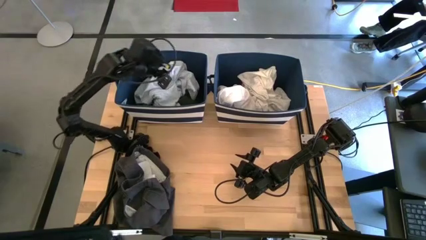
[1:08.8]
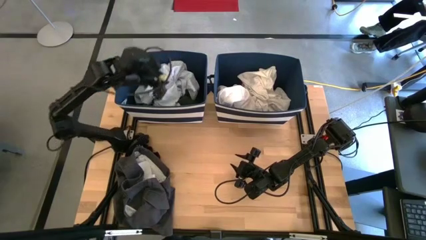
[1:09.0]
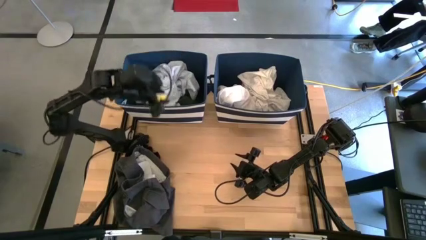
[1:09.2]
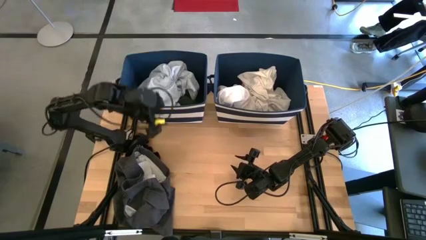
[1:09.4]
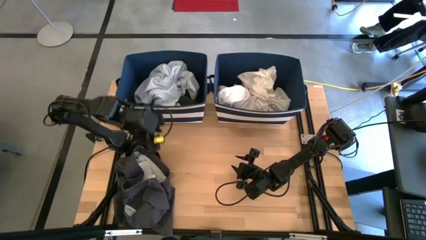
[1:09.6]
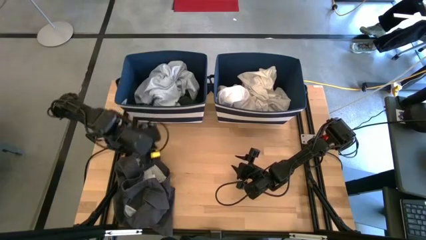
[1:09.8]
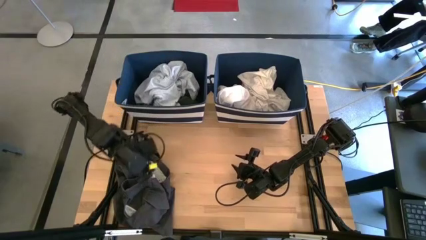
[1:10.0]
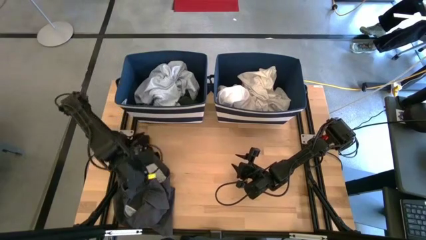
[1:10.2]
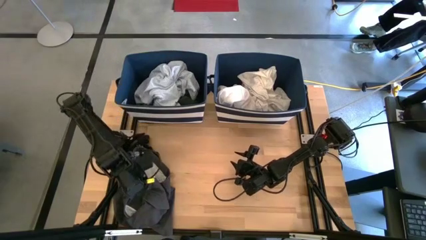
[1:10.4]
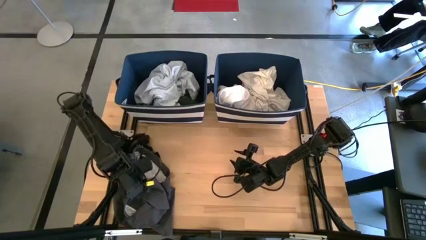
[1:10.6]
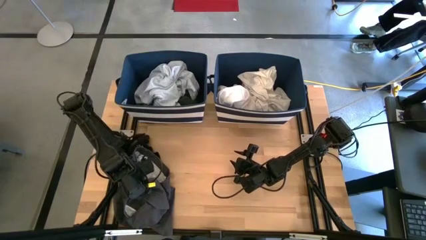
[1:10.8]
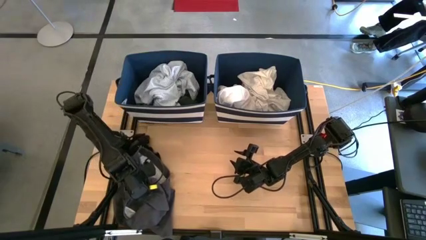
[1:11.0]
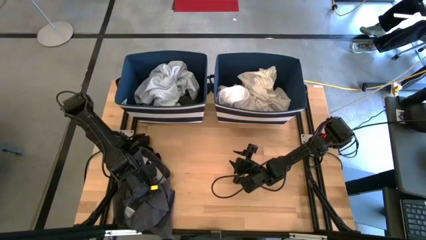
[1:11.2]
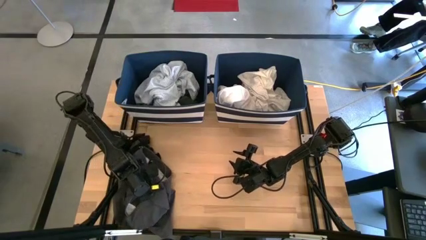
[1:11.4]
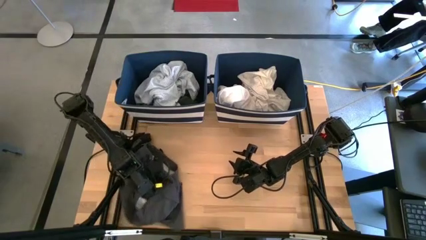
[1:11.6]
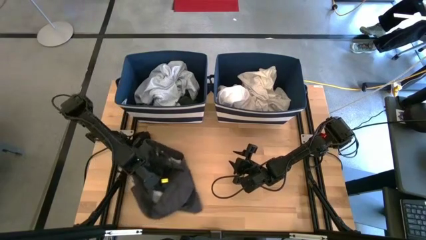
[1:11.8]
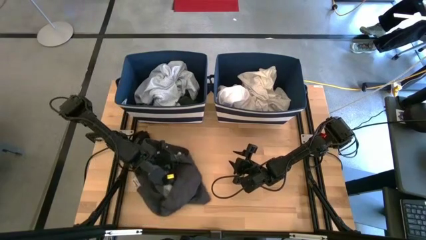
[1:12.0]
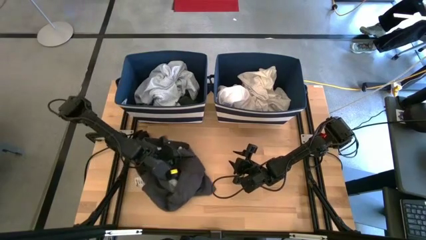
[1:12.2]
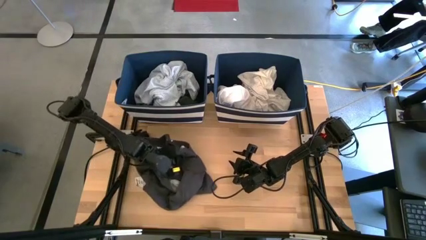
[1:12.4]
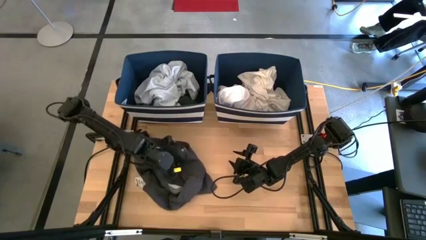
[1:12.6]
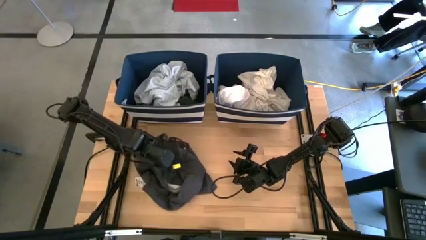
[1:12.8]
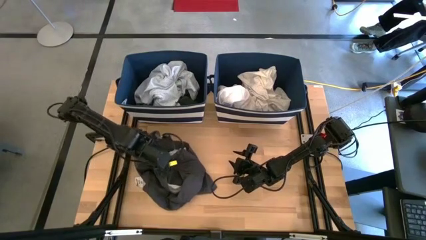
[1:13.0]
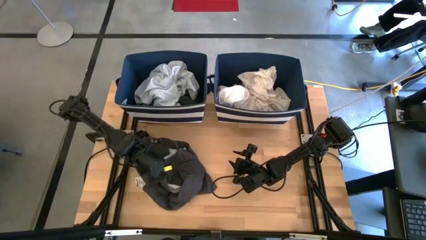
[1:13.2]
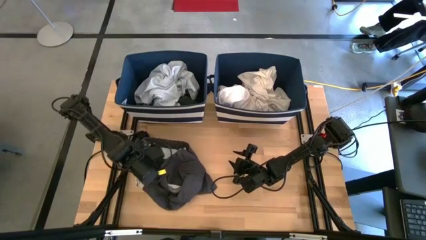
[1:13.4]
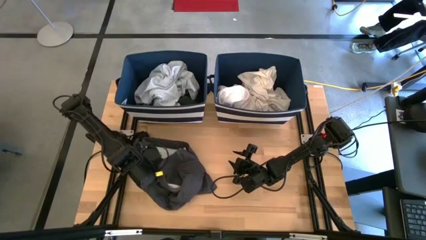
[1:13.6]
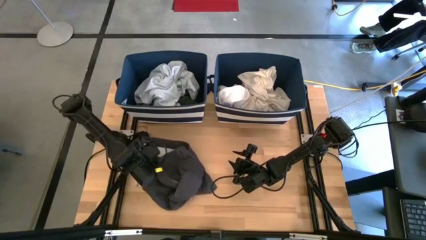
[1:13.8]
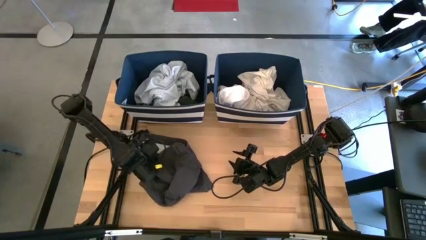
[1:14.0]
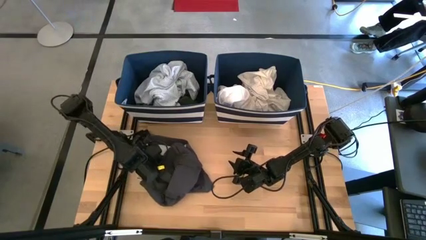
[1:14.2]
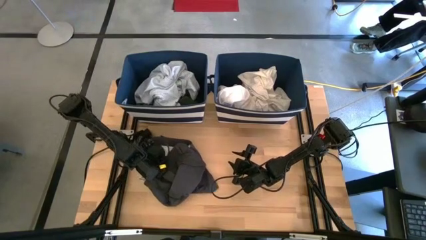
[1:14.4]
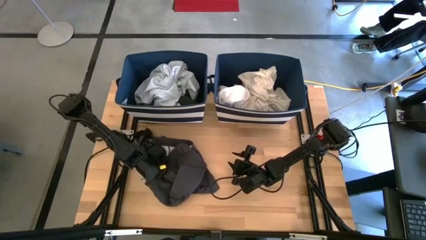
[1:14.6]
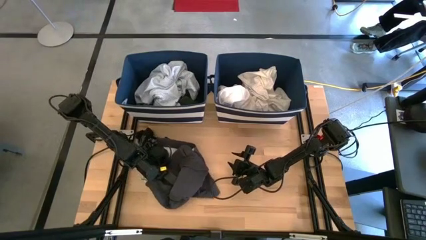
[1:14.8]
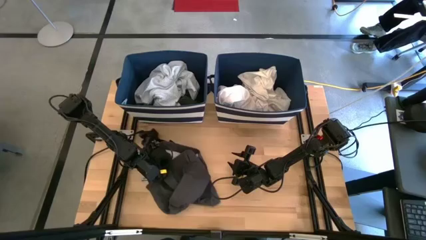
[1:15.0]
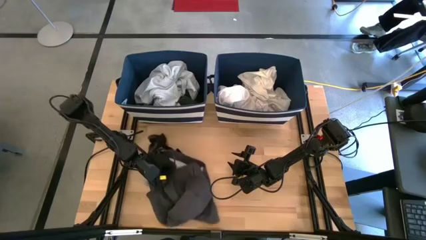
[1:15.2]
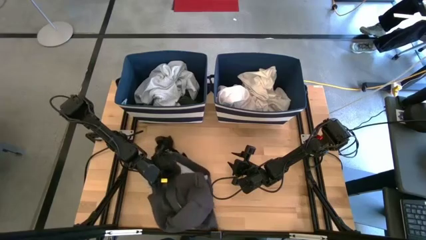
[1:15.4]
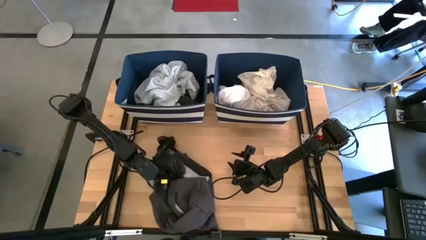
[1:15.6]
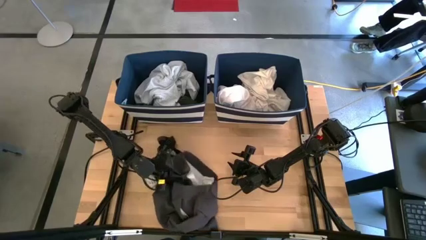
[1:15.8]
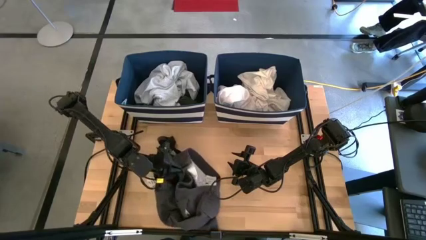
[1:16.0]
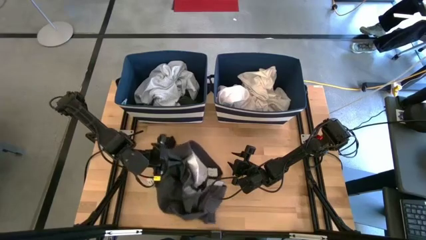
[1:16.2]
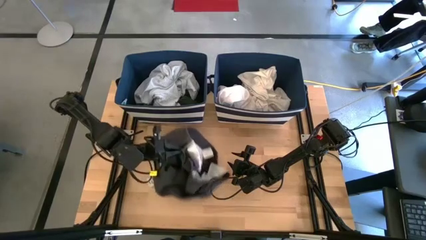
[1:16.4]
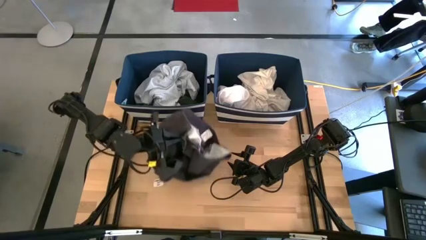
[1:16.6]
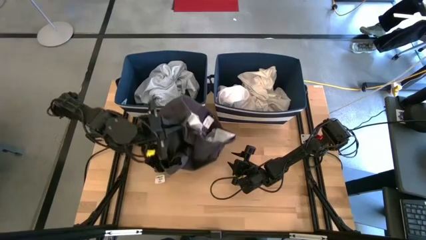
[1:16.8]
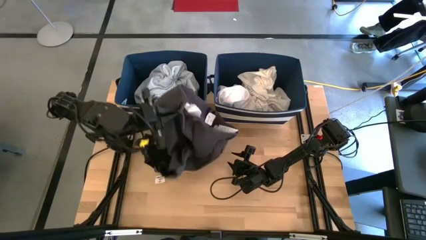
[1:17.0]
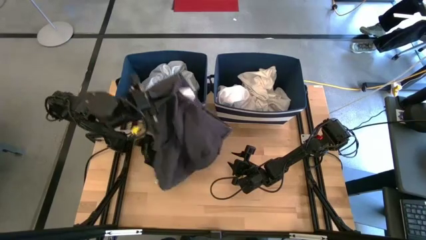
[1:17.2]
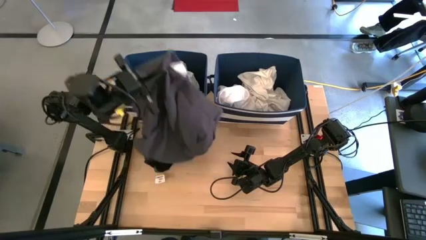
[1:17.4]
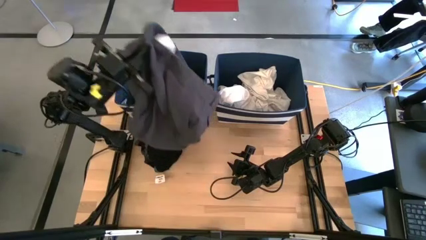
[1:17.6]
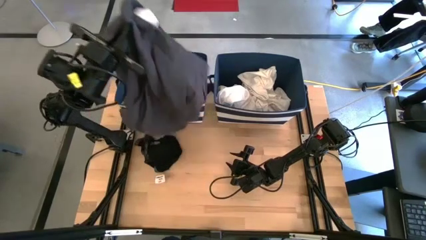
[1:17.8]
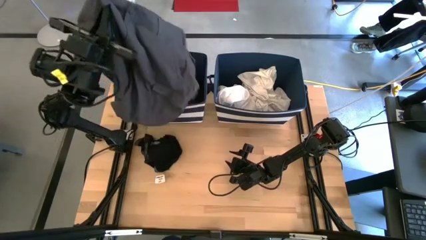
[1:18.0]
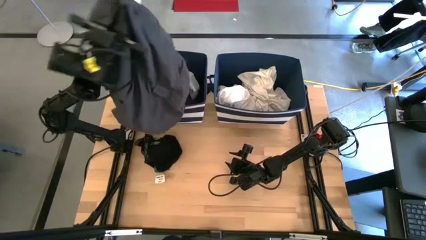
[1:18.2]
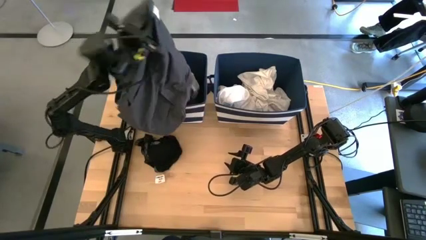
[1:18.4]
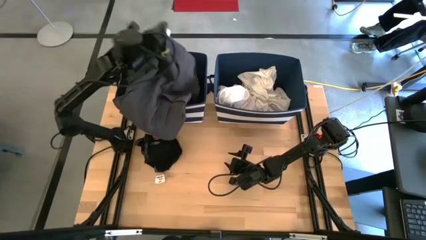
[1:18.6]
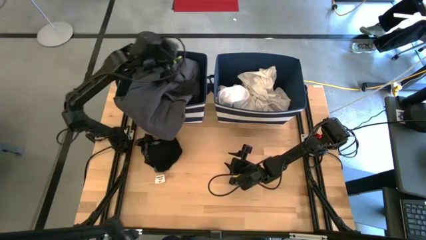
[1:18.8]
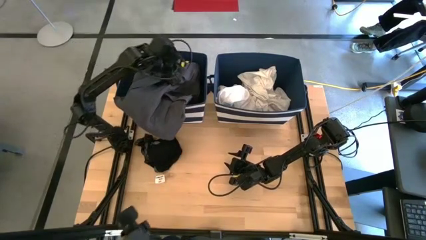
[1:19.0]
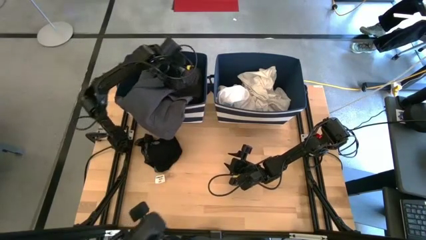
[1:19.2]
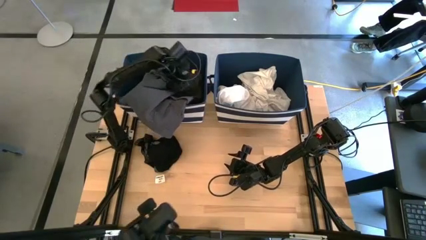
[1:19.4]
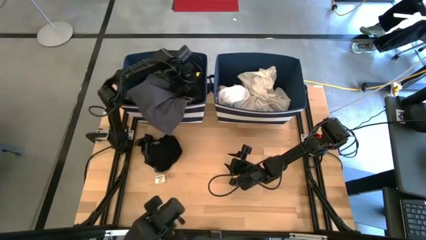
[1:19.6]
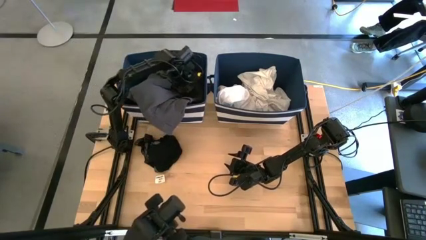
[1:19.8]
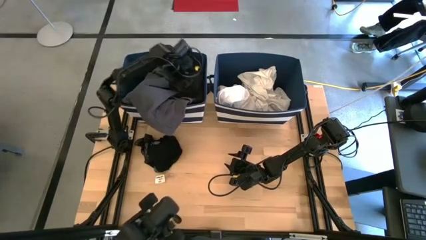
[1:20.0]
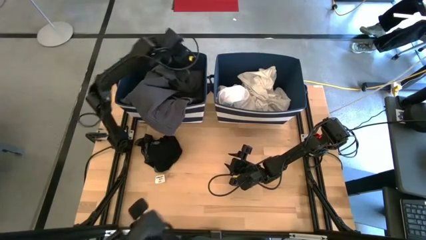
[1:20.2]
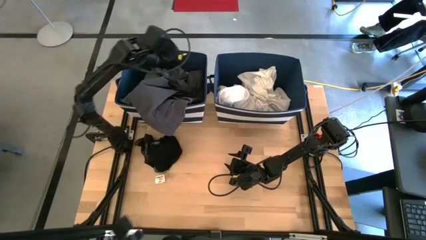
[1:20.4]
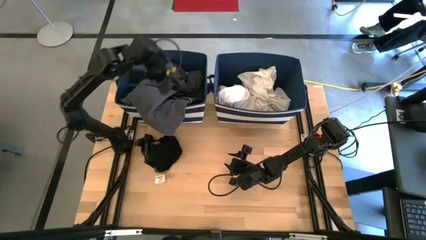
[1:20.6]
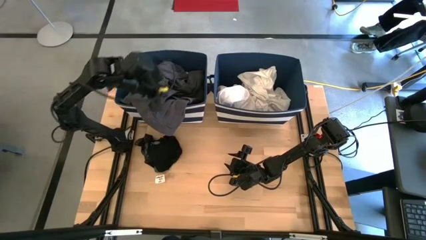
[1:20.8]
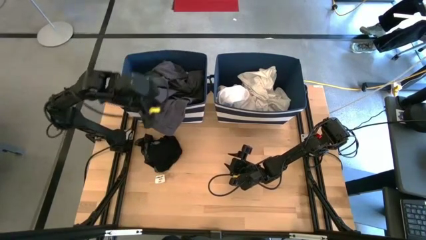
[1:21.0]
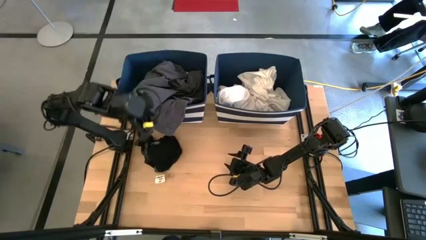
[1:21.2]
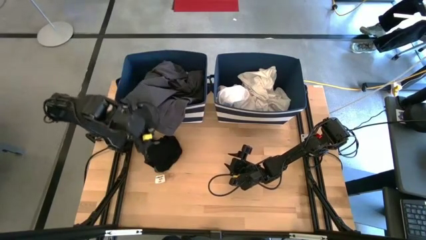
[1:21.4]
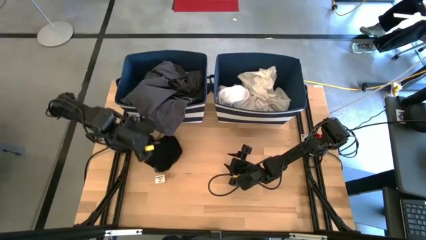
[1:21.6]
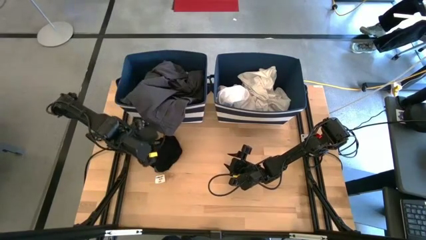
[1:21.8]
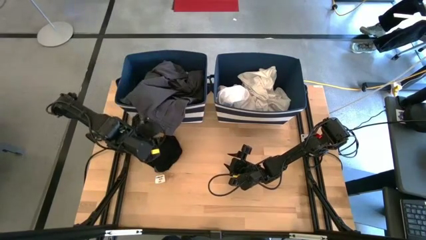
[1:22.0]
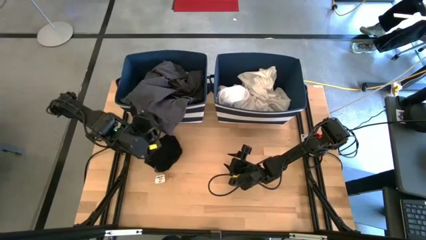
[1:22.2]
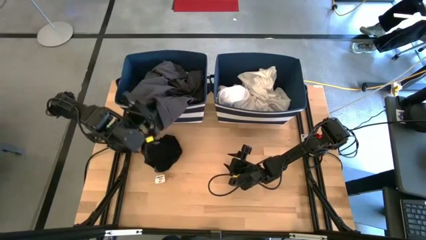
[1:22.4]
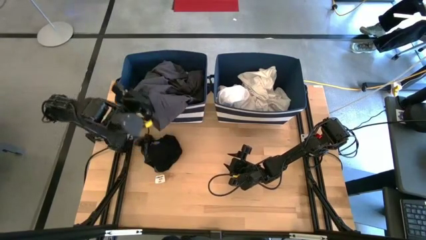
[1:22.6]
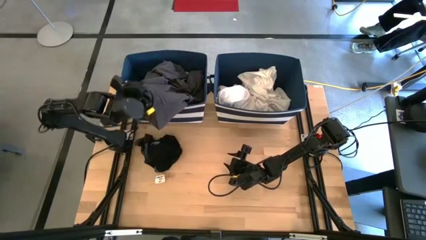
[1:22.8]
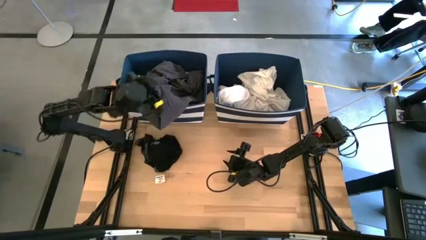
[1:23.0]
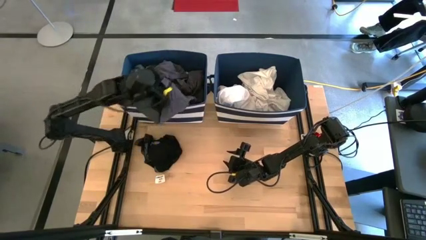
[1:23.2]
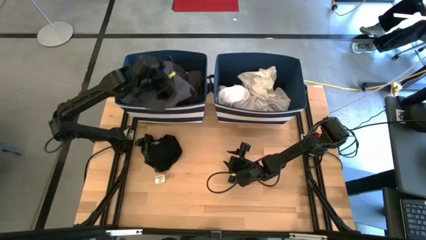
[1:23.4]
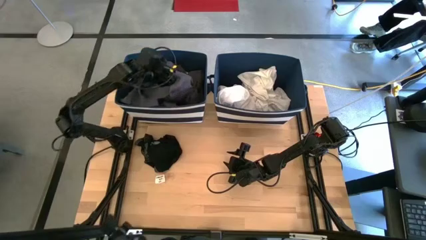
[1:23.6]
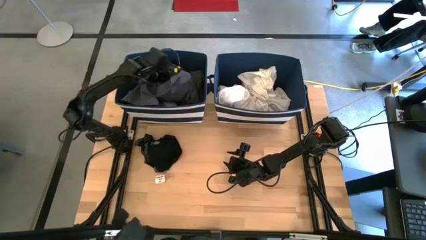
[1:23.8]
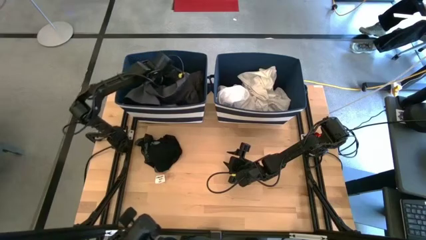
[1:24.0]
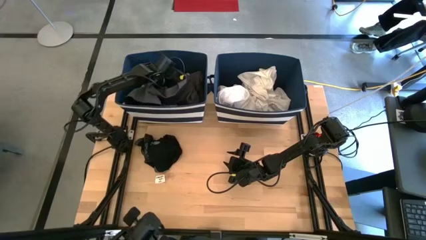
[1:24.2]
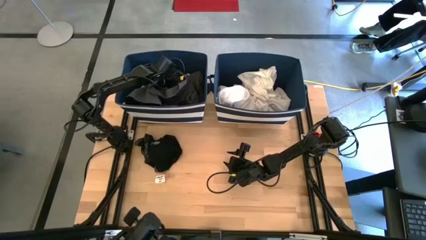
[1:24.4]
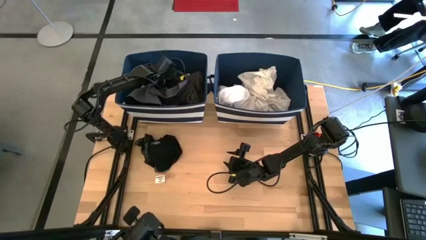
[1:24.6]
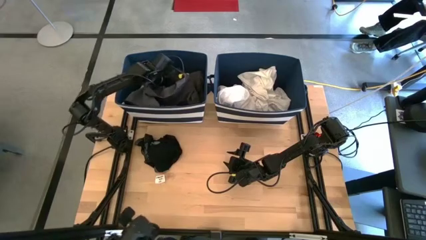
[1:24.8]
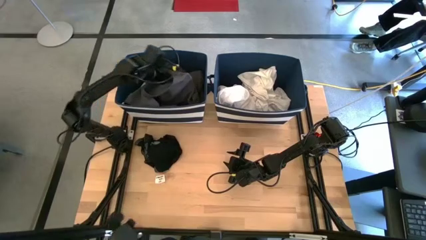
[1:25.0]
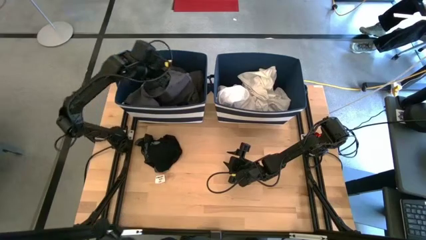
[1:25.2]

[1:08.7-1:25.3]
Task: Sort clothes
Put the black shorts into the left laundry bin
